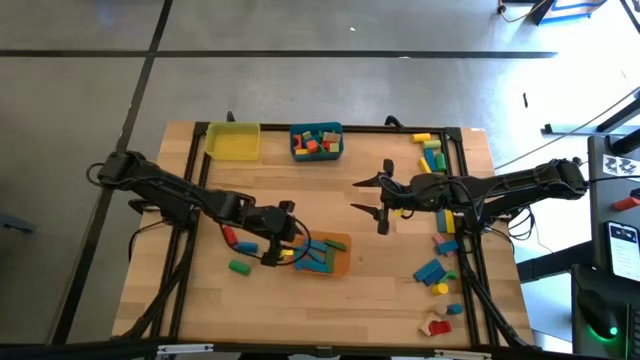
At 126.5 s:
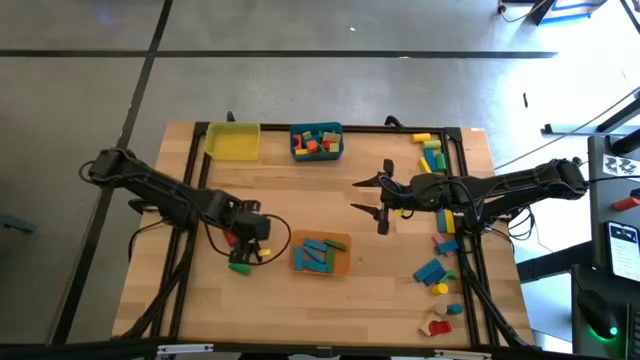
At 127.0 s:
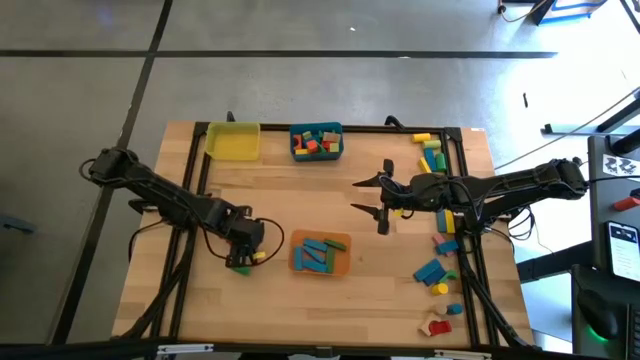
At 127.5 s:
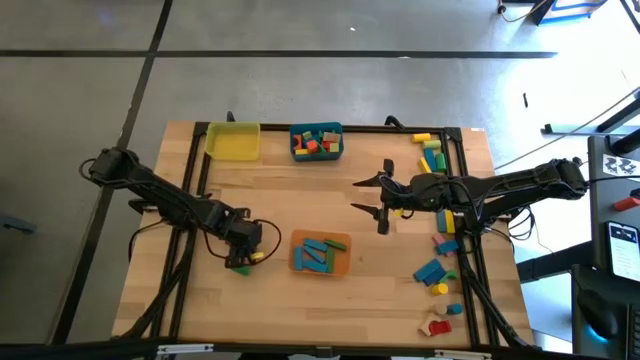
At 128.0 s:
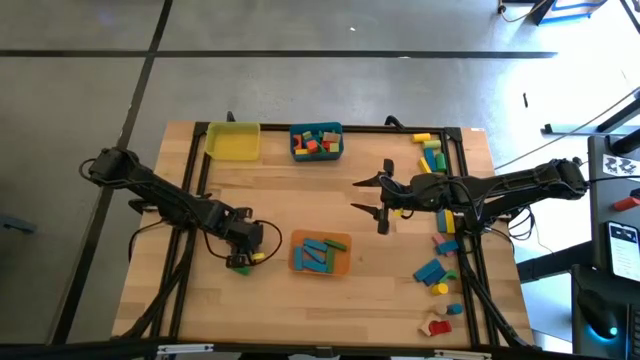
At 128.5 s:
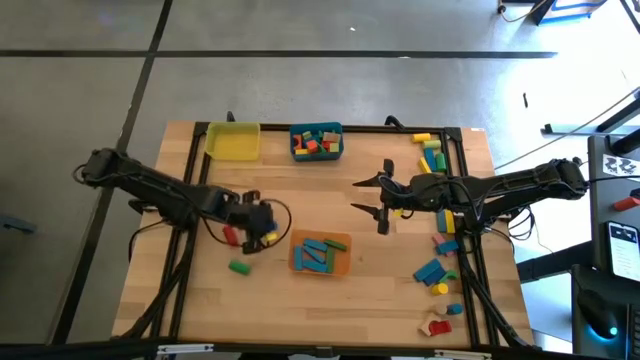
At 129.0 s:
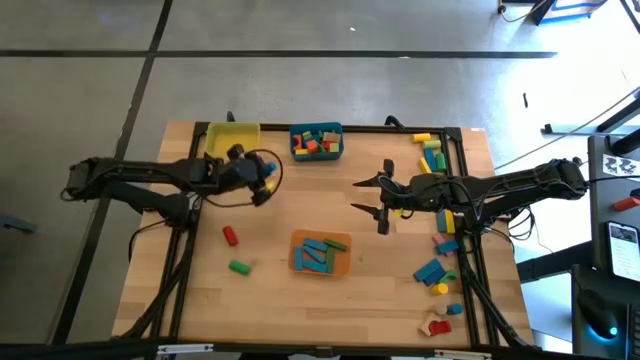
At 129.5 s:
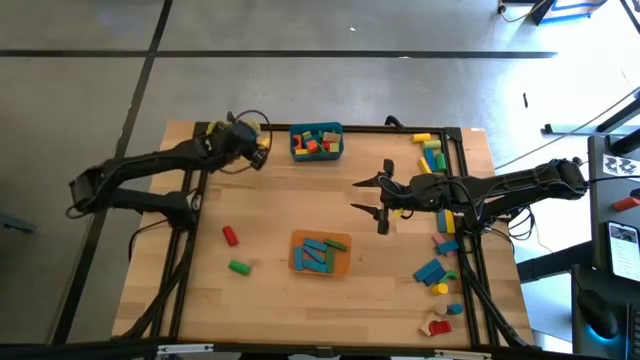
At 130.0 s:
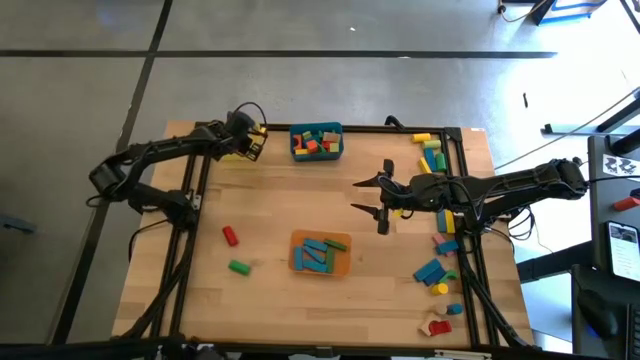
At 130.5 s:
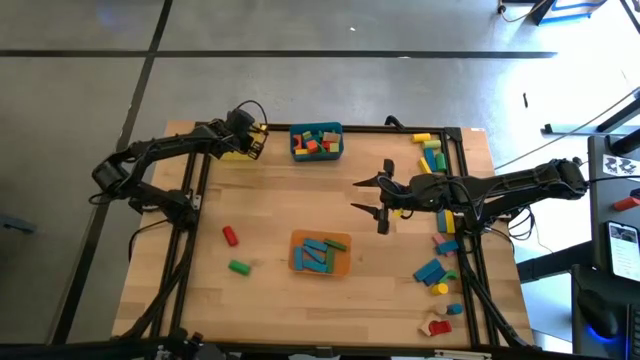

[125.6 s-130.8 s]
Task: Sort blocks by size
Put the blue cylindrical block into the yellow bin

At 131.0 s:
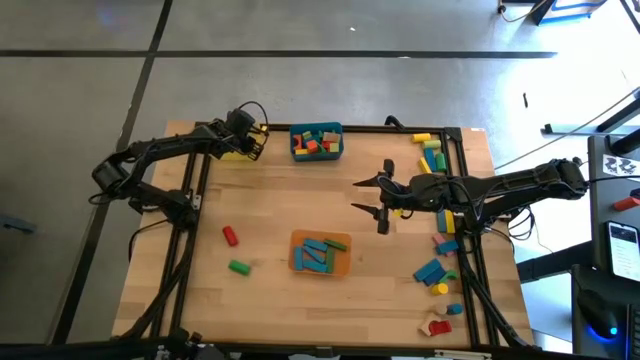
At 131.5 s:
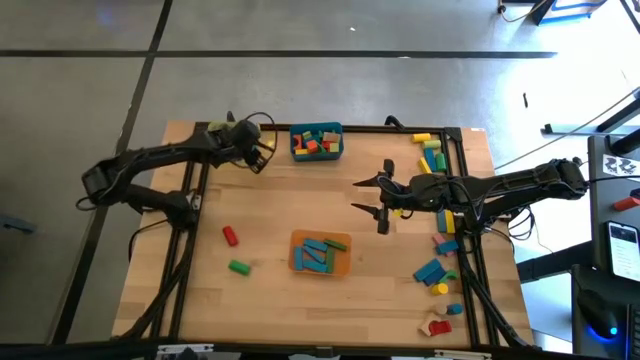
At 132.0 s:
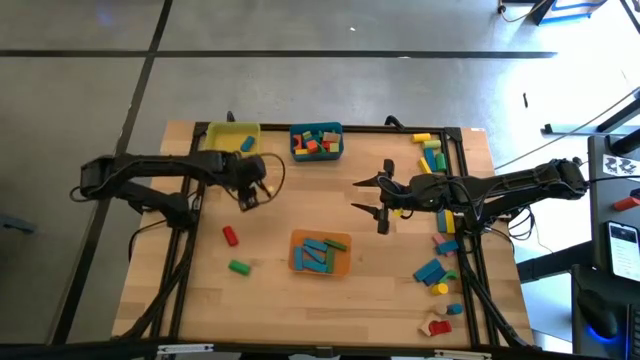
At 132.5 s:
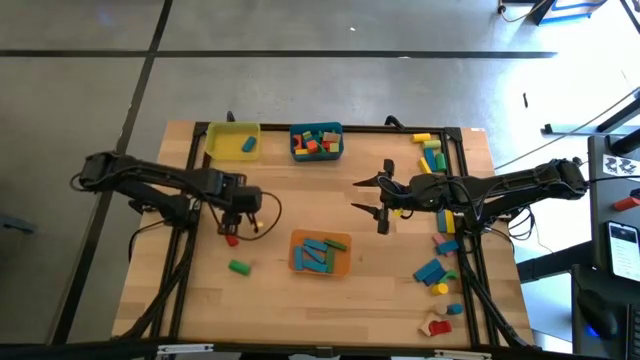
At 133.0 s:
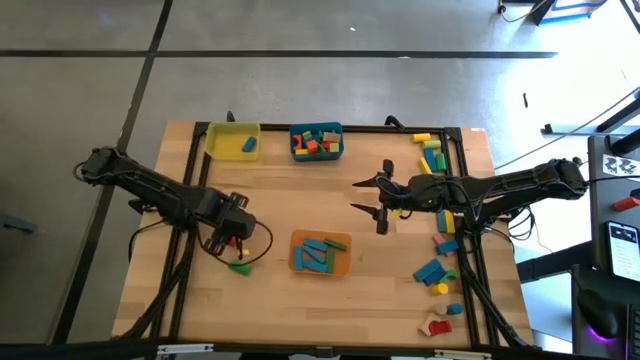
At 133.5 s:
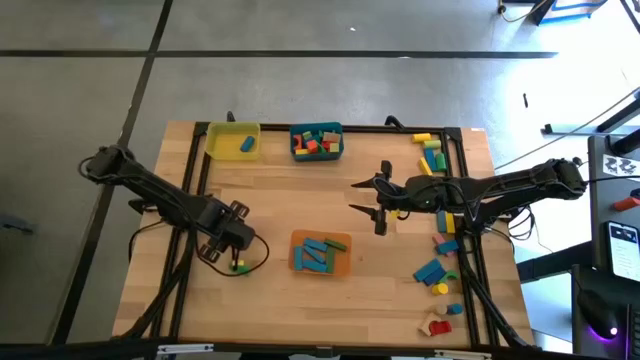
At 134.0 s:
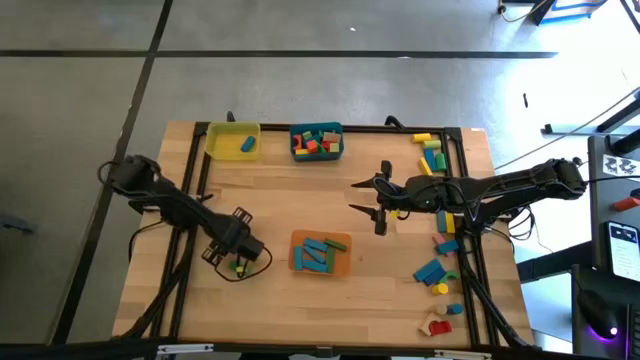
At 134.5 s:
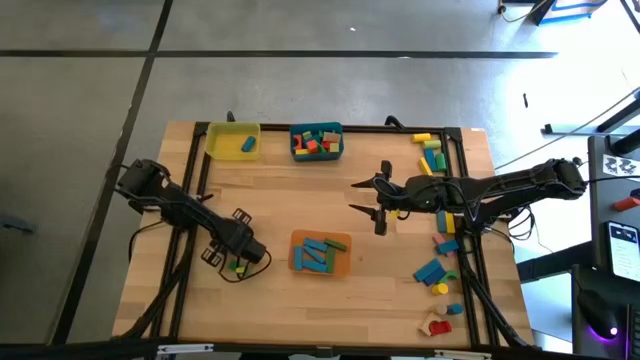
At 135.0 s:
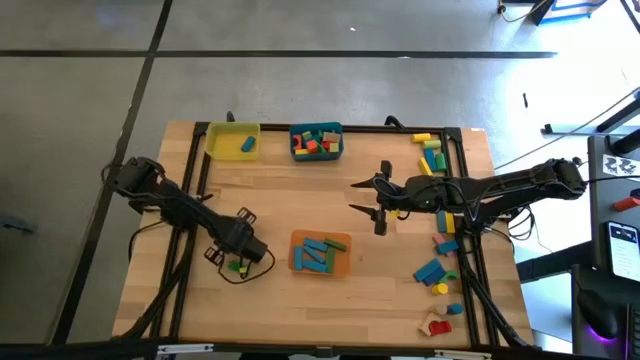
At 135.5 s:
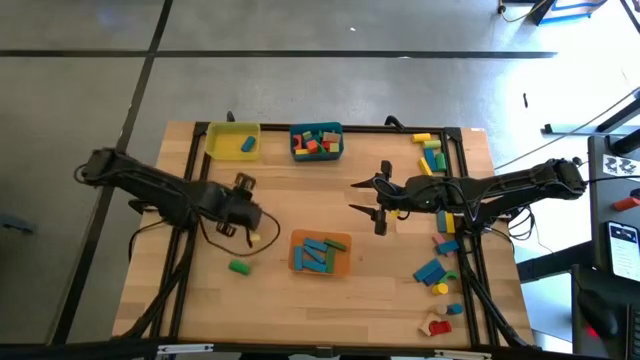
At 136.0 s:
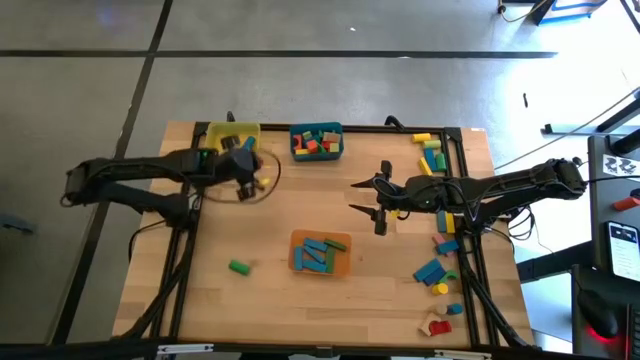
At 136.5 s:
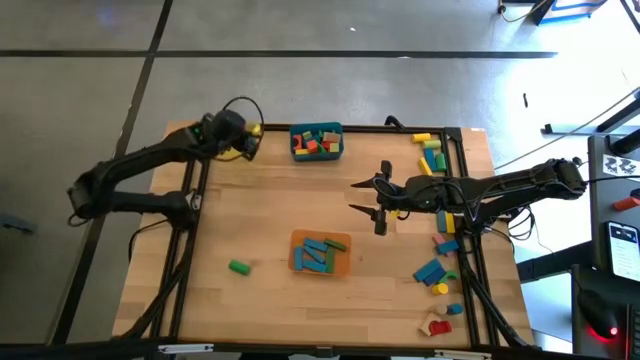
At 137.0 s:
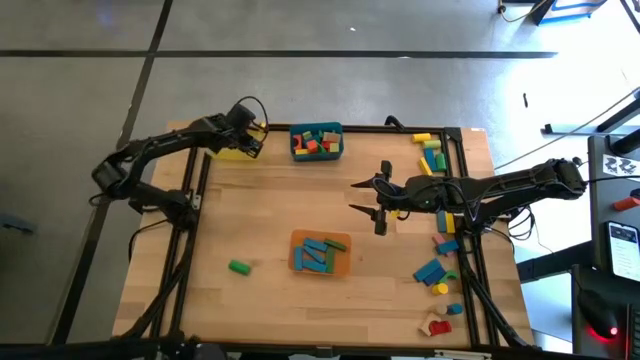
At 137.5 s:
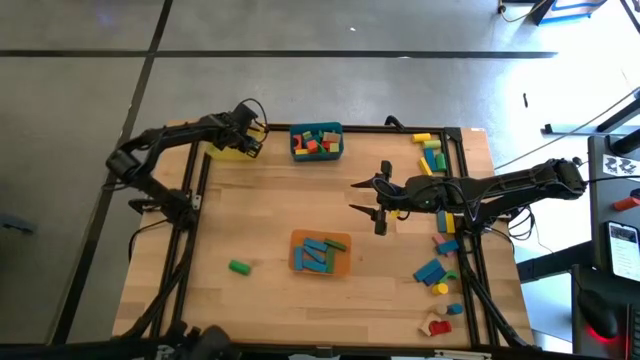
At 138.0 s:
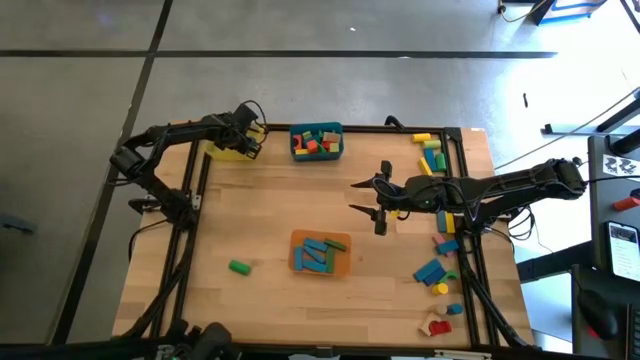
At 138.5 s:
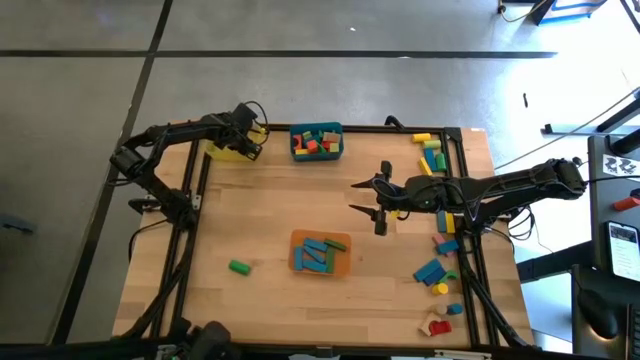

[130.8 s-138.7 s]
Put the red cylindrical block into the yellow bin

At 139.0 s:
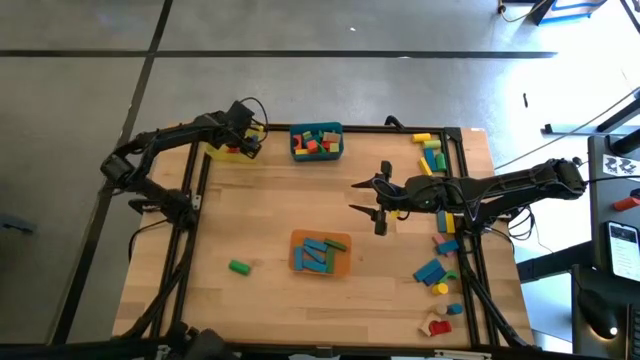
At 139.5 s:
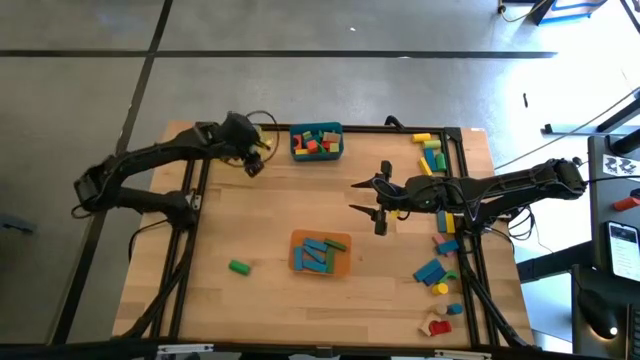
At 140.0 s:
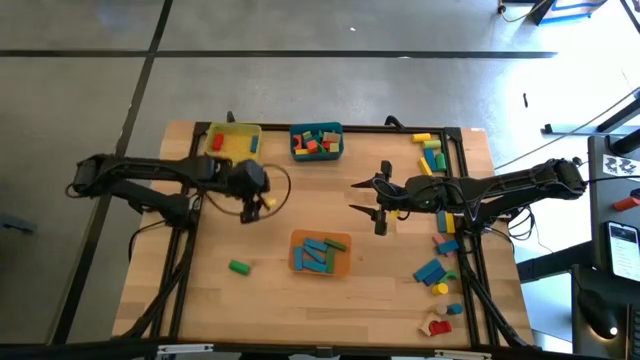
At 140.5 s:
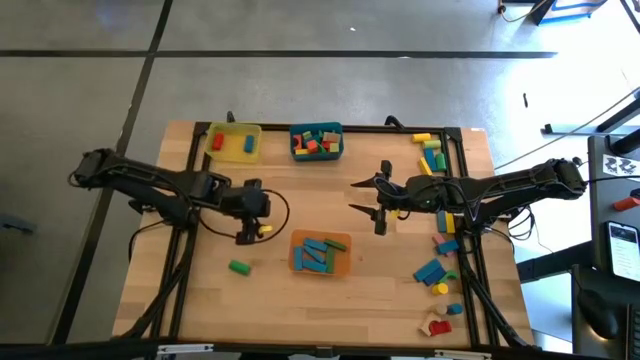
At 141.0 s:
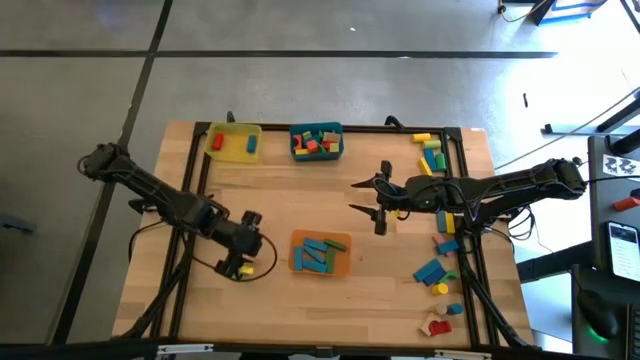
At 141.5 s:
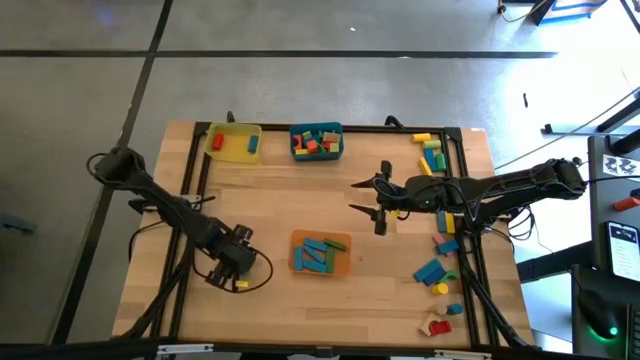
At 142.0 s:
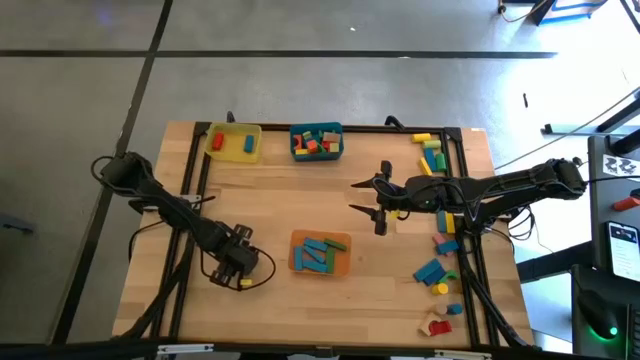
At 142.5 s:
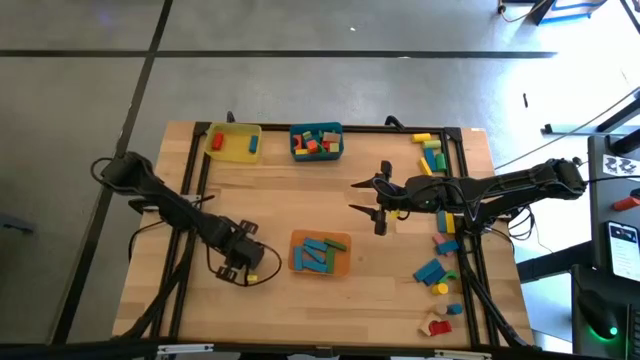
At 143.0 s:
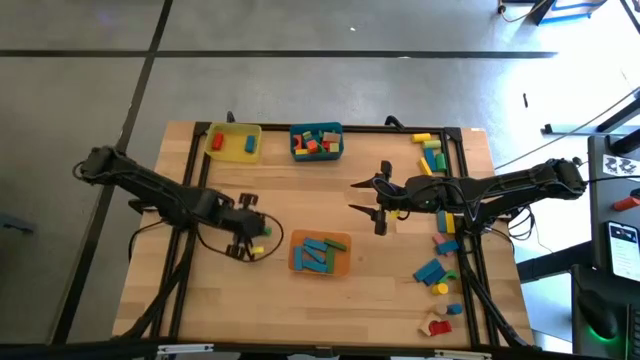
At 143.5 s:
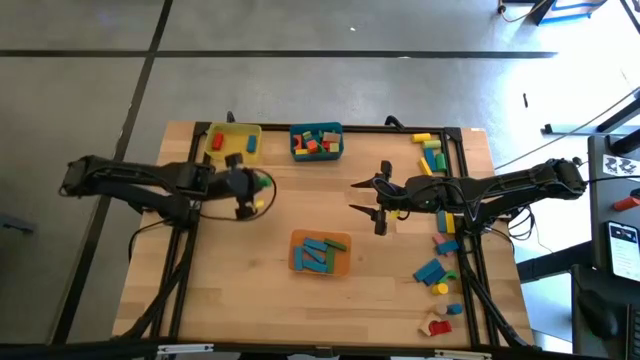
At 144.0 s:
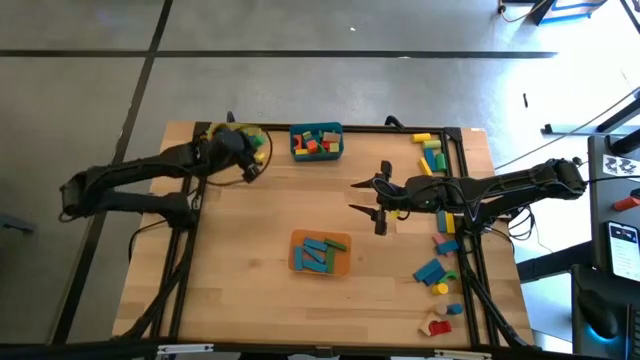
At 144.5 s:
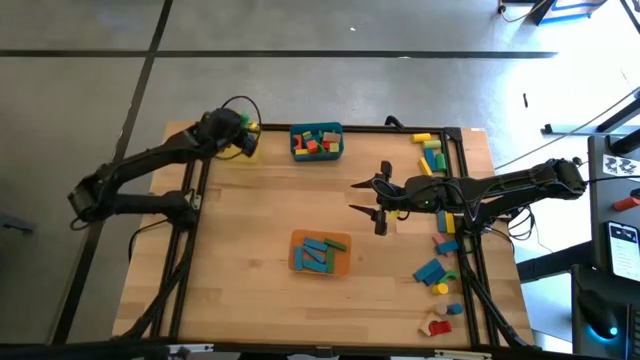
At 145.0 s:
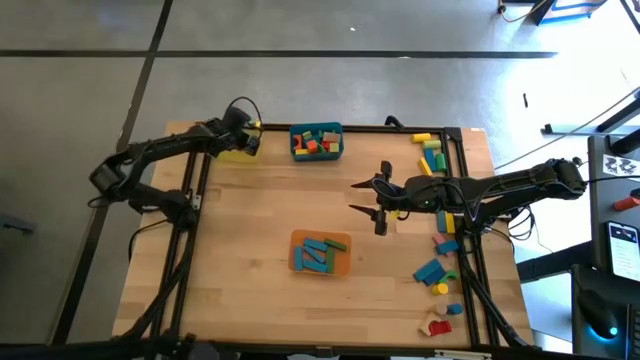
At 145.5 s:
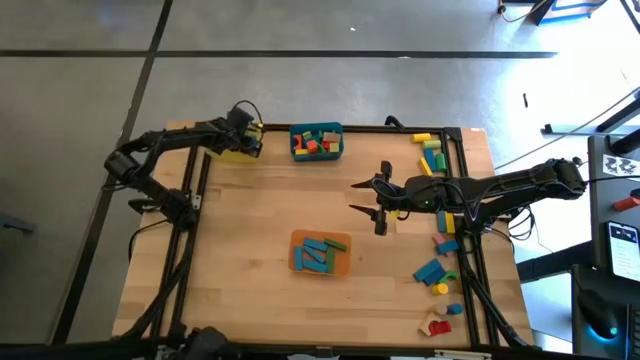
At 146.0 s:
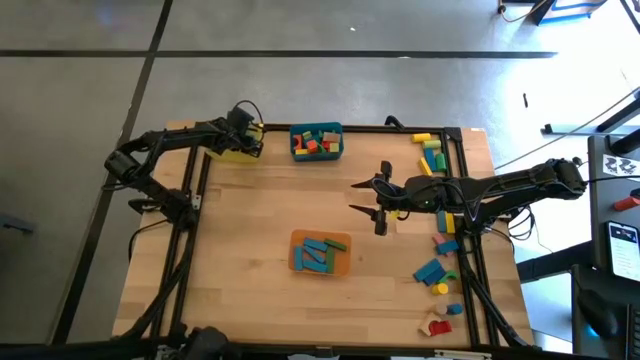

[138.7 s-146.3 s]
Put the green cylindrical block into the yellow bin
